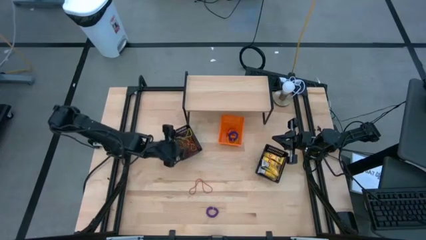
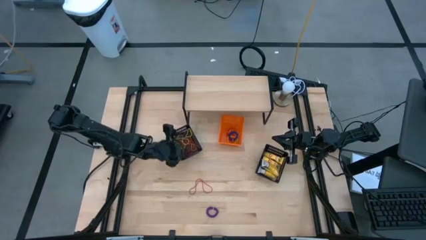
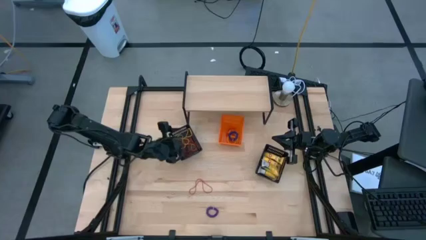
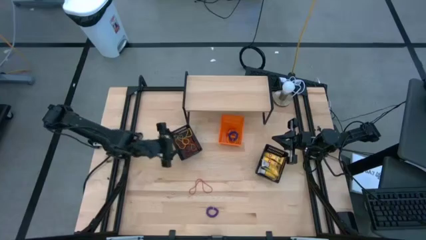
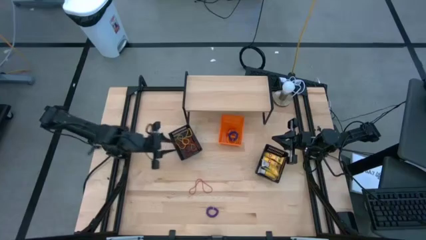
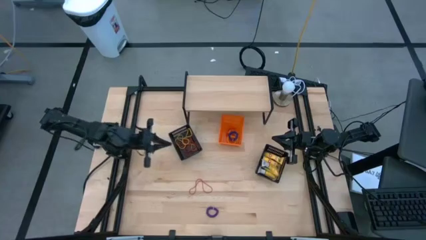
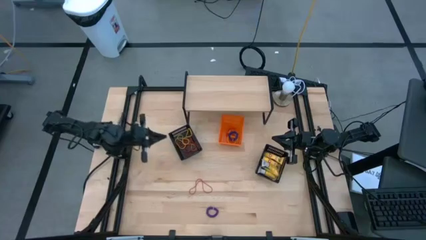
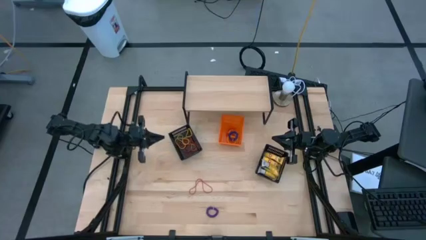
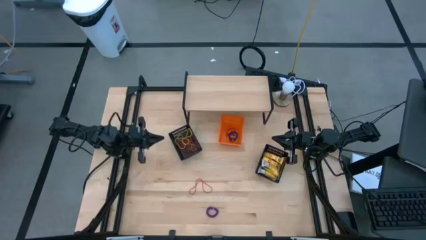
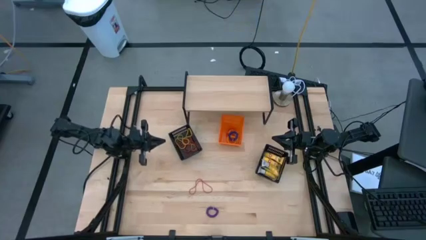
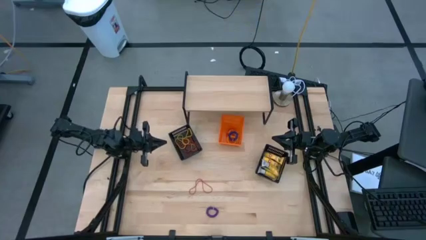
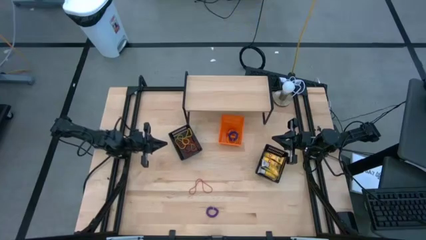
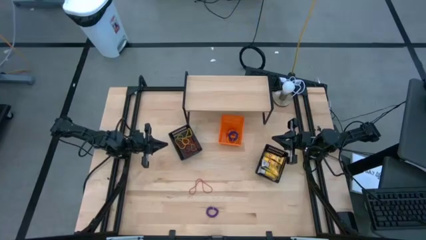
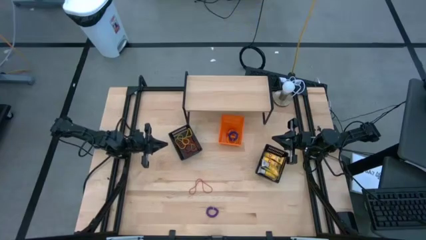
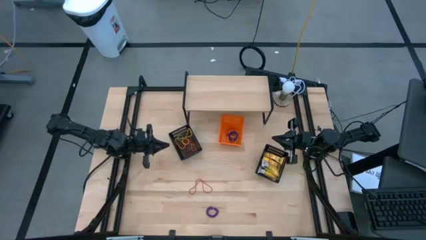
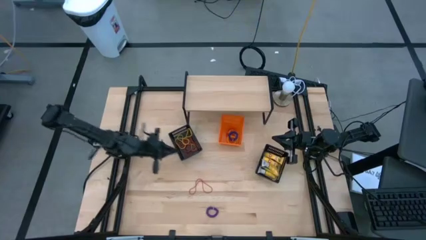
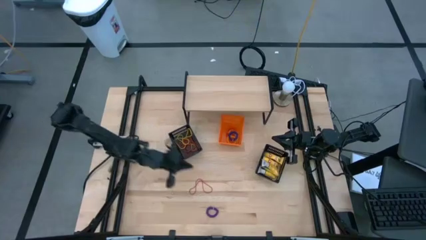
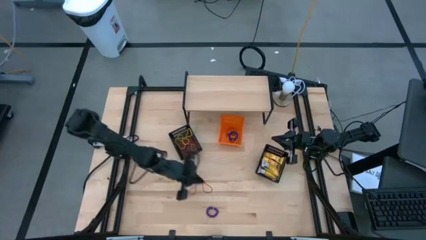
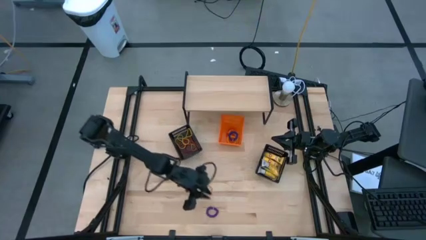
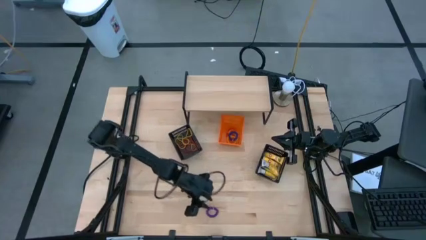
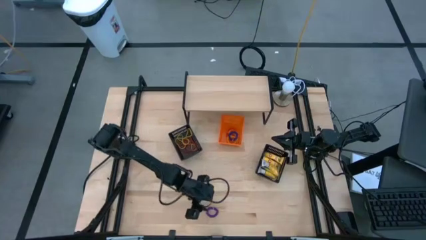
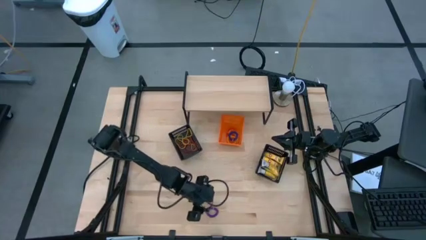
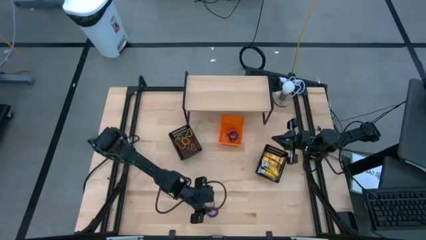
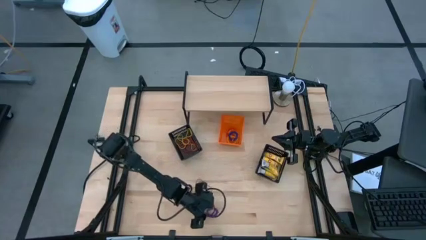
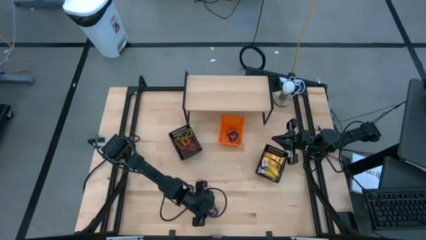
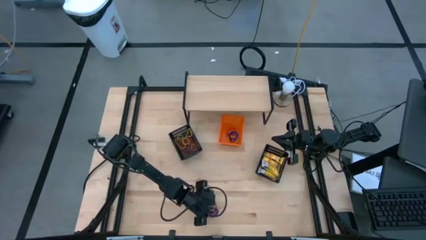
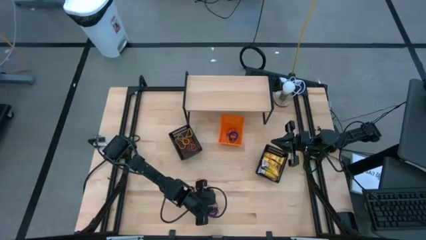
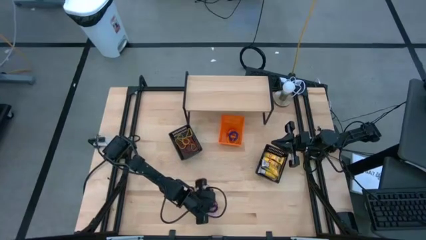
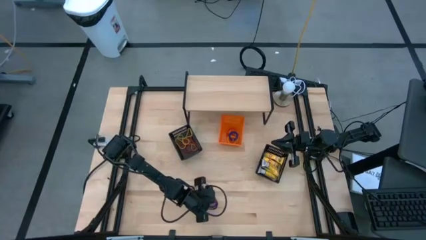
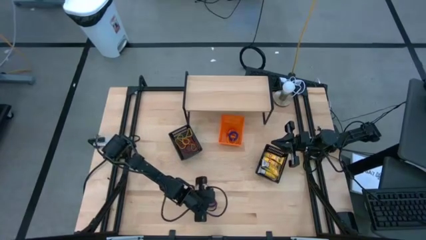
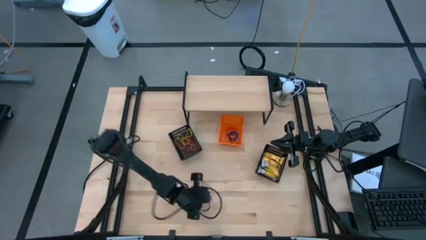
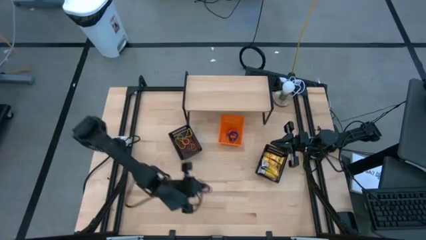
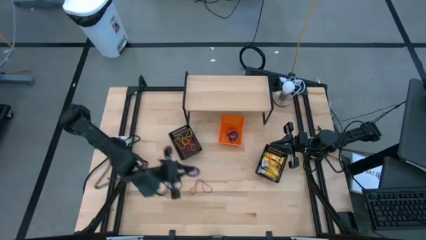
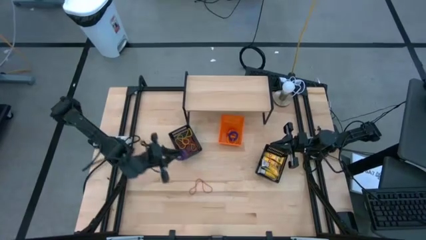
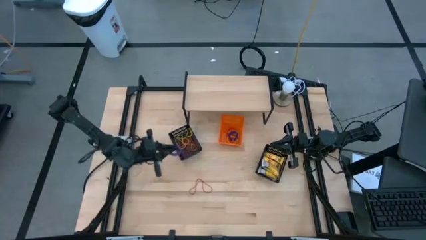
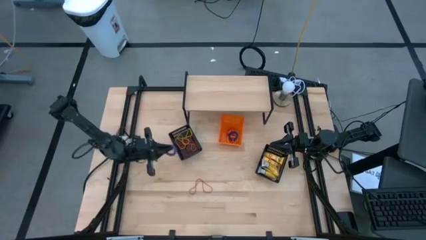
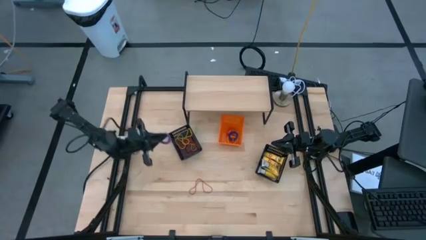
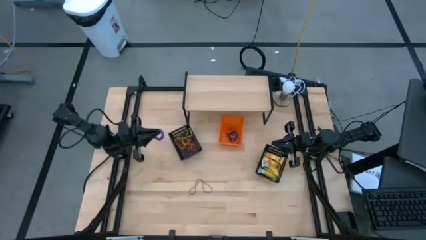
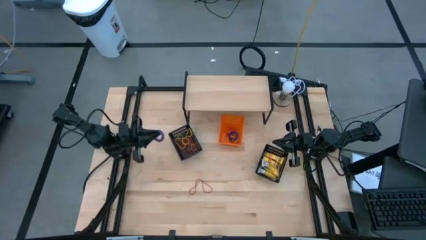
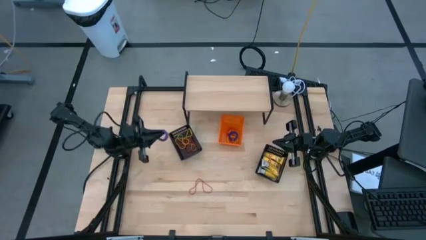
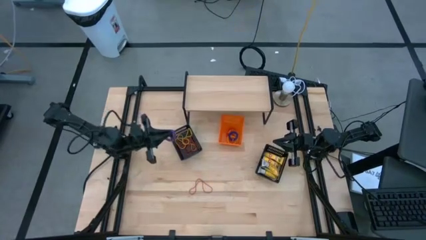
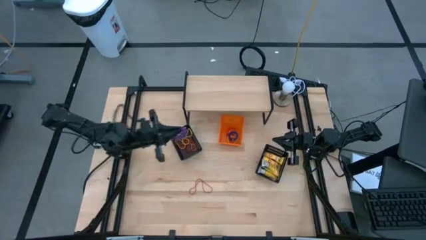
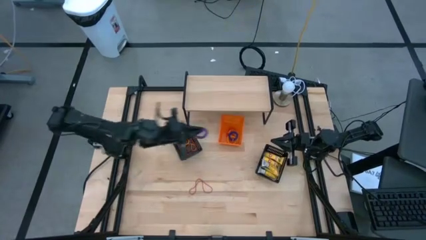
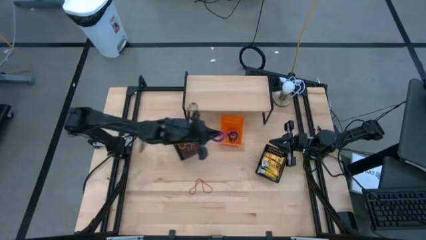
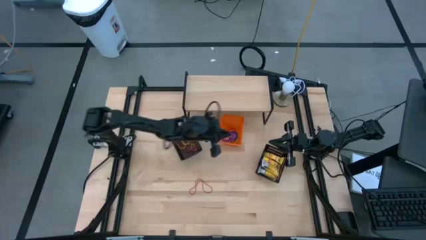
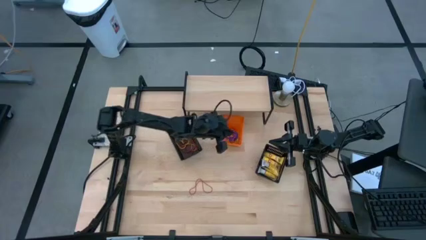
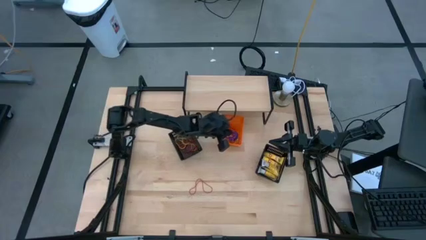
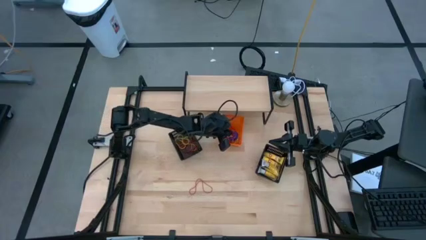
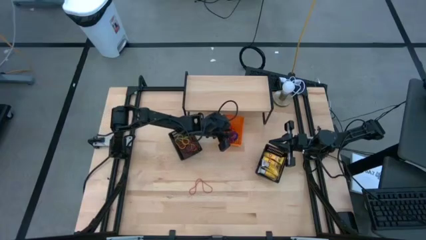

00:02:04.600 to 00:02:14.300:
Task: Pick & Place Office Desk Supplies
Put the violet spring keychain into the orange bin

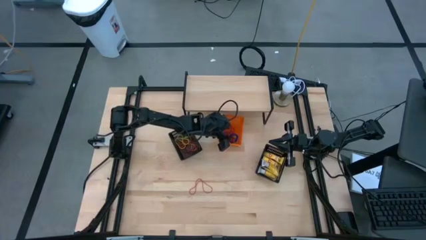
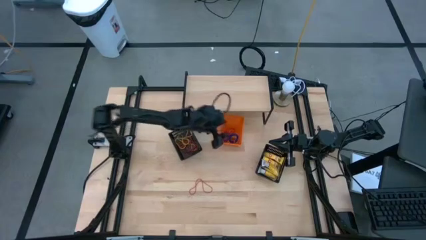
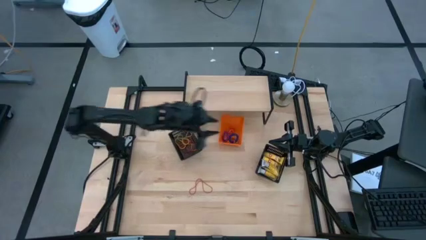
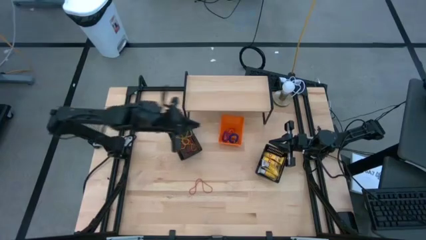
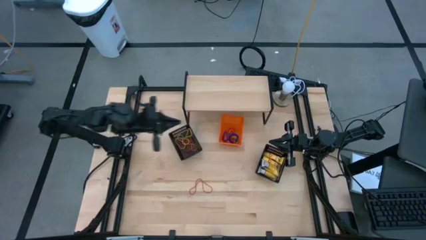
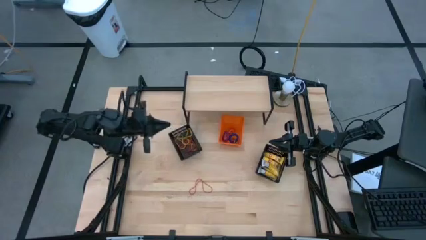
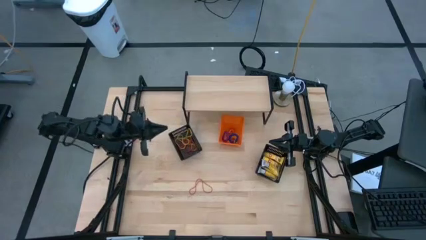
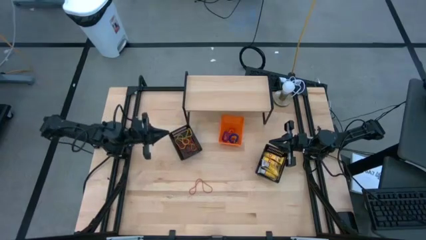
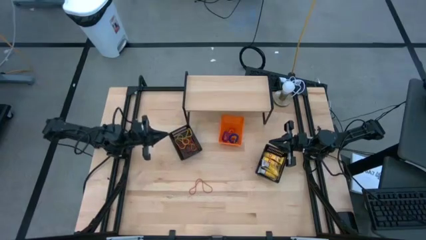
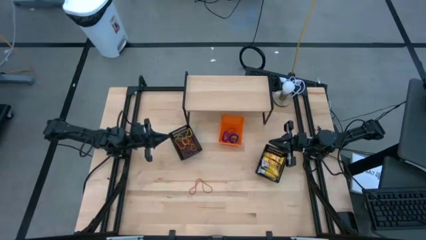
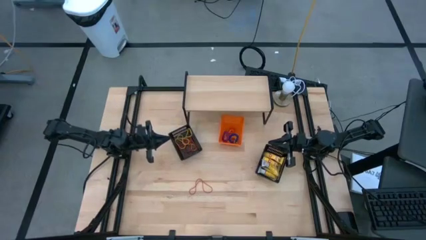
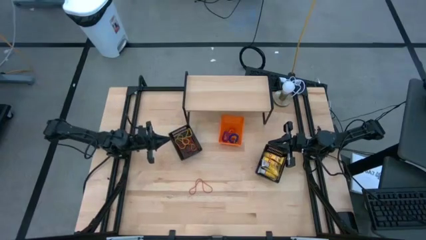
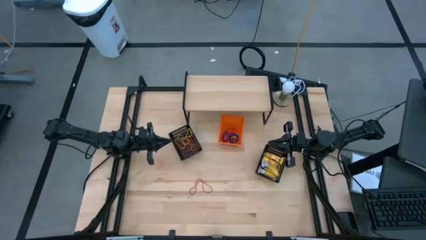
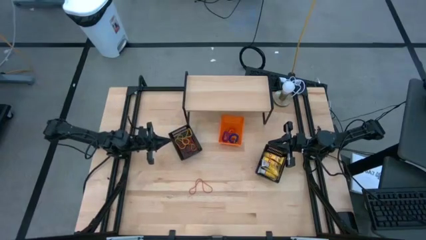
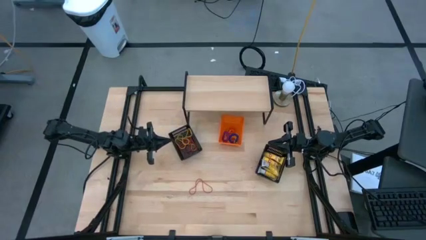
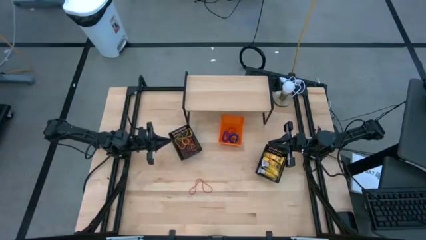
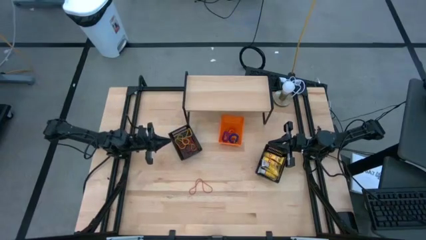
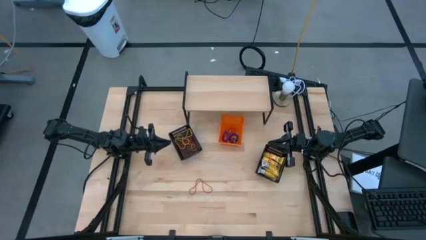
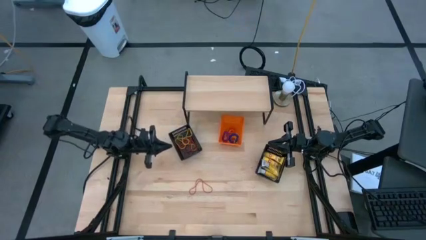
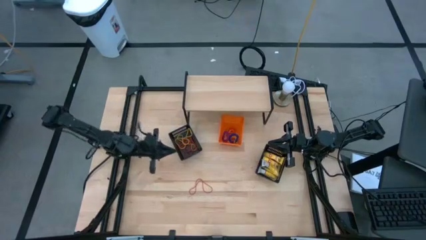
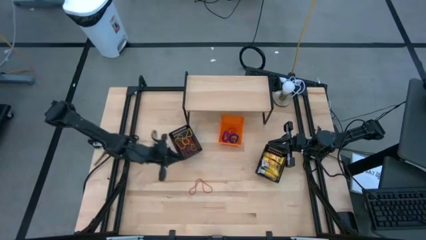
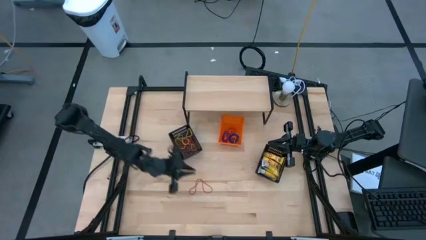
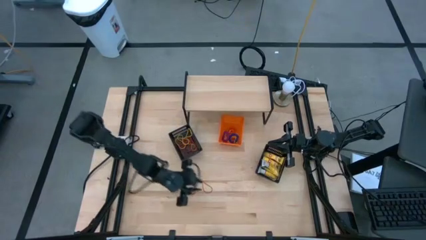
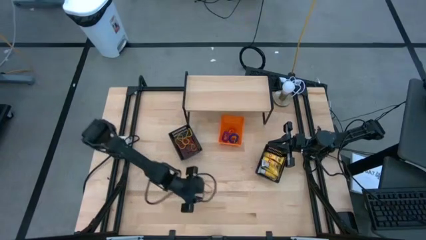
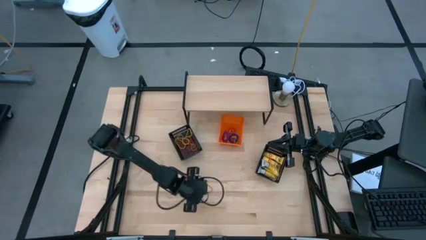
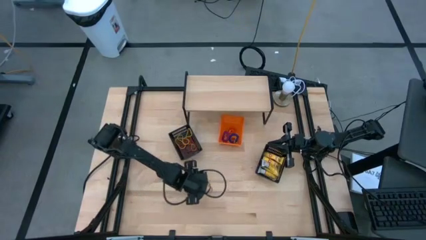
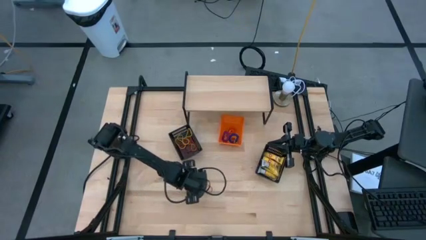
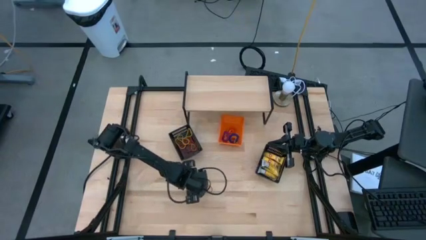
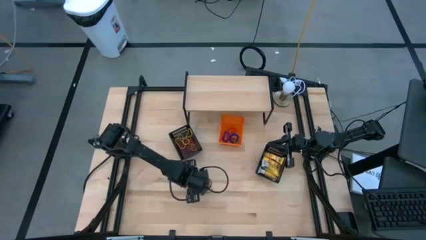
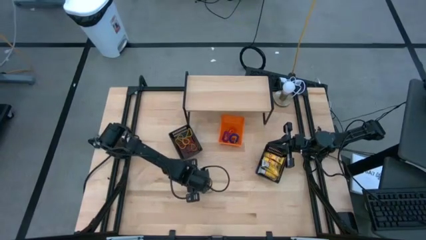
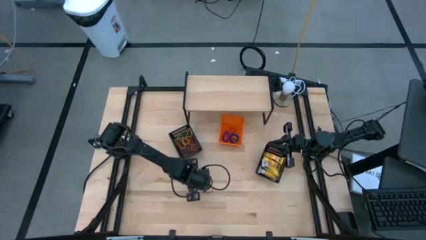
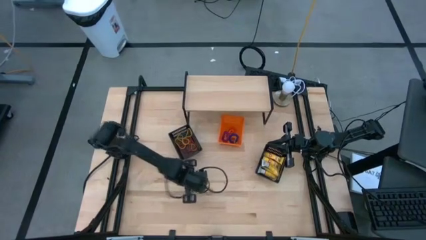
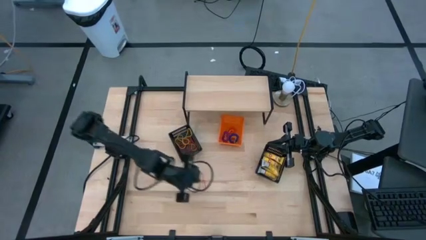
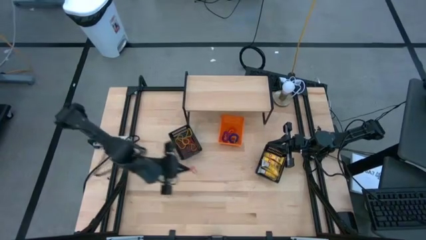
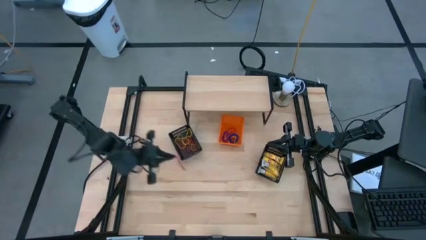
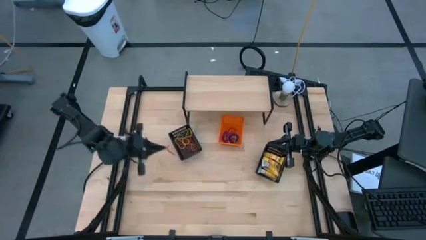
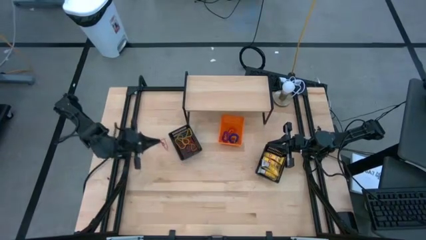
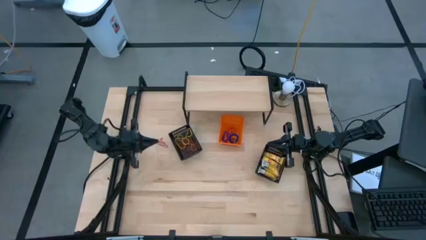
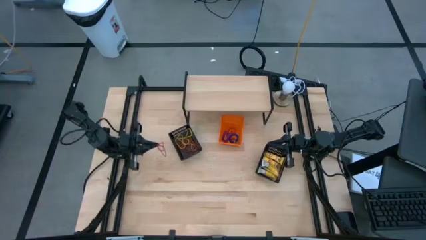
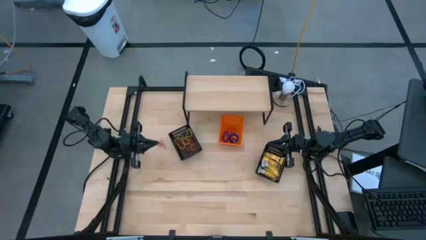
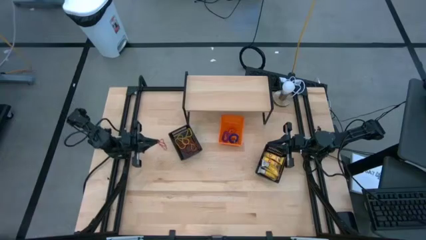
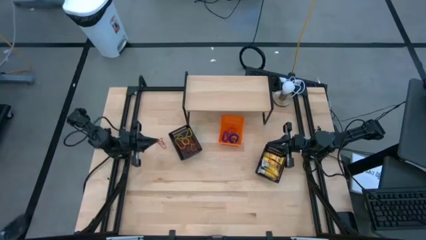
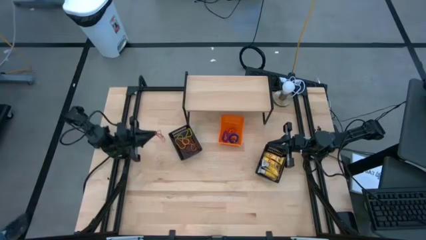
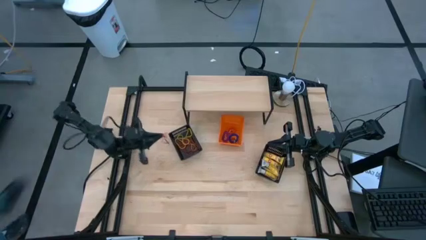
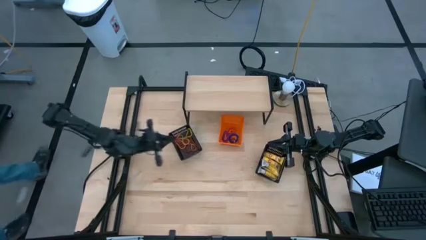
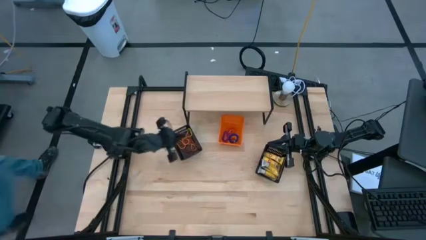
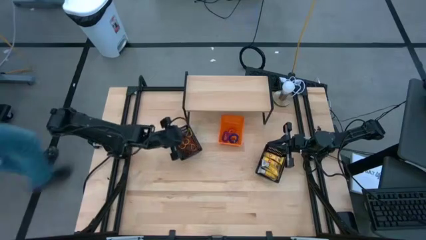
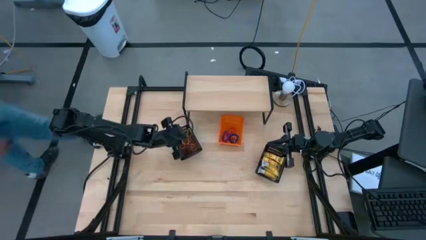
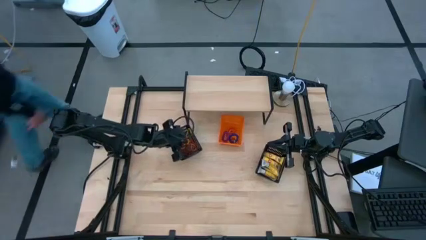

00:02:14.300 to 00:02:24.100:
Put the red rubberband into the left black bin
